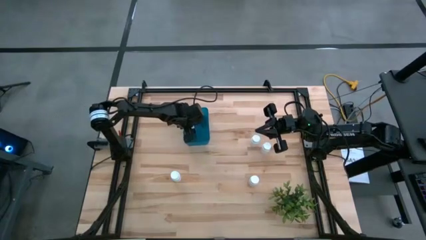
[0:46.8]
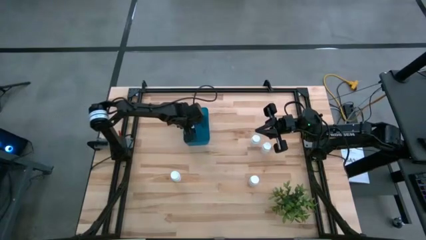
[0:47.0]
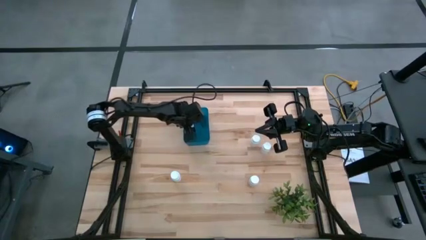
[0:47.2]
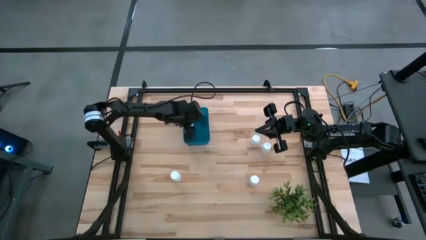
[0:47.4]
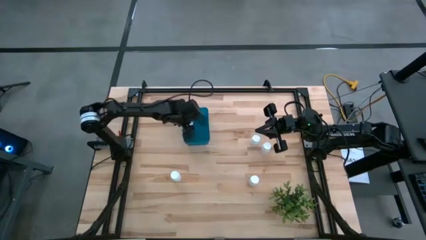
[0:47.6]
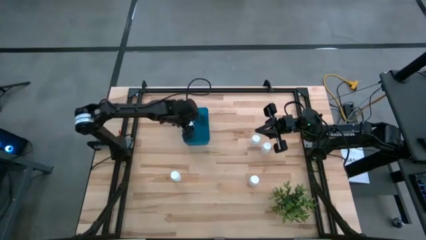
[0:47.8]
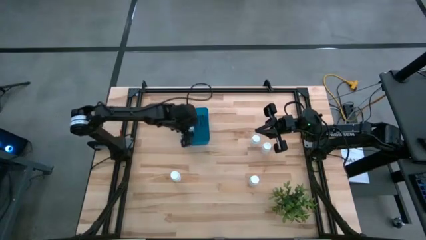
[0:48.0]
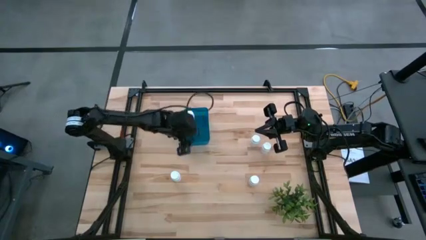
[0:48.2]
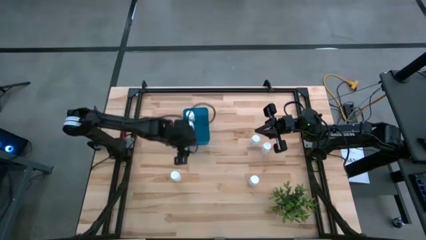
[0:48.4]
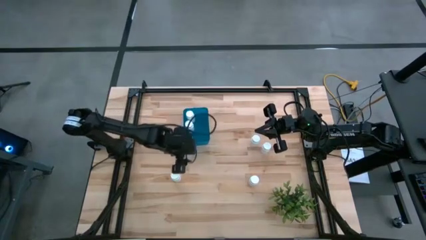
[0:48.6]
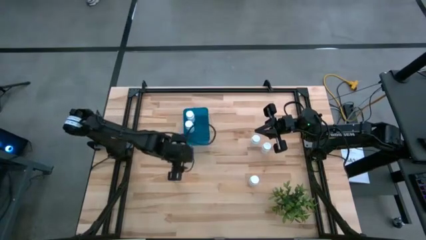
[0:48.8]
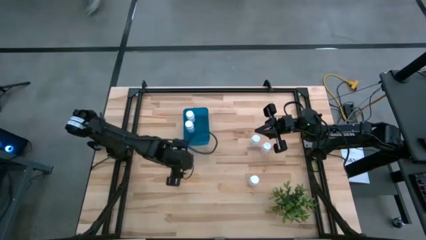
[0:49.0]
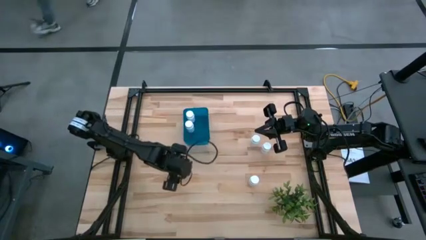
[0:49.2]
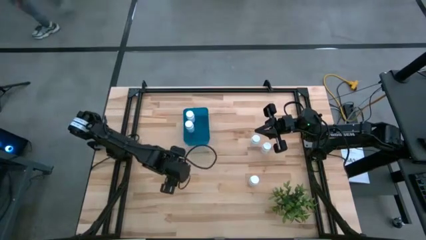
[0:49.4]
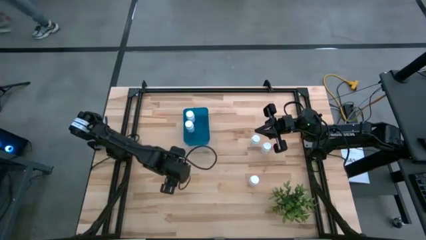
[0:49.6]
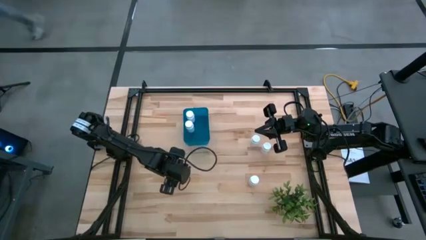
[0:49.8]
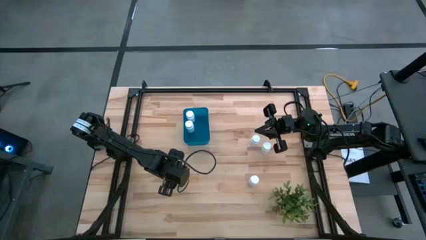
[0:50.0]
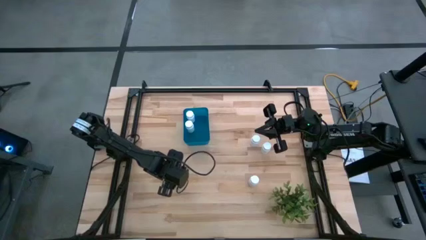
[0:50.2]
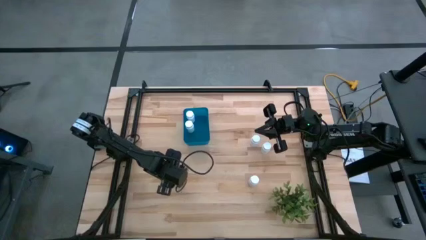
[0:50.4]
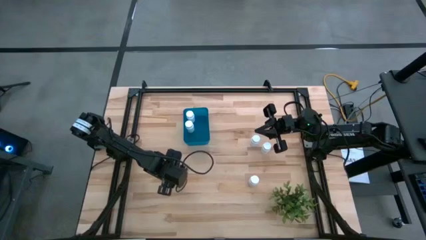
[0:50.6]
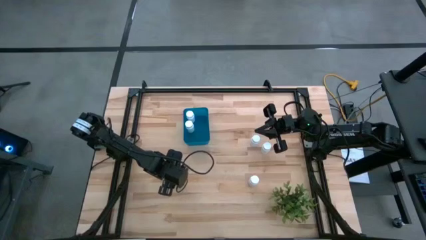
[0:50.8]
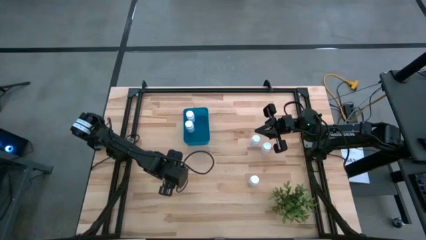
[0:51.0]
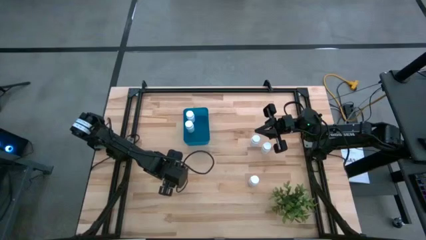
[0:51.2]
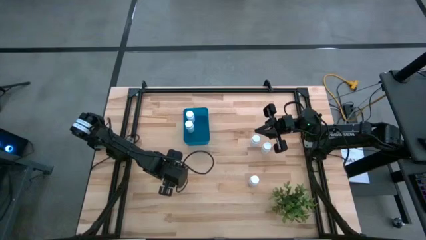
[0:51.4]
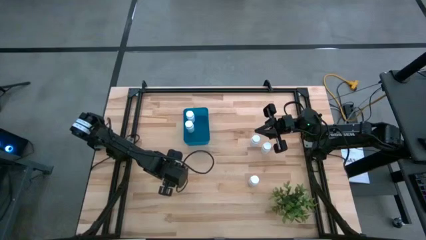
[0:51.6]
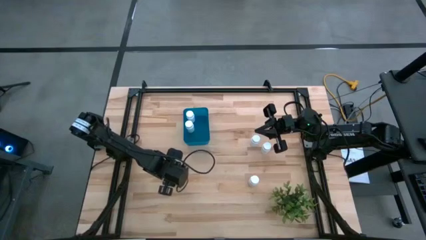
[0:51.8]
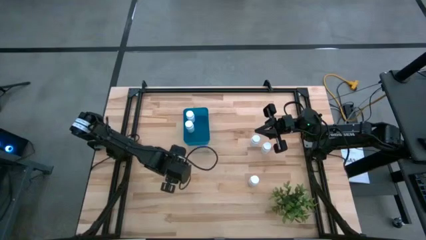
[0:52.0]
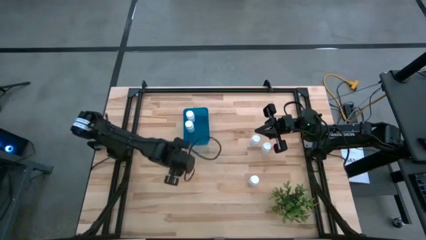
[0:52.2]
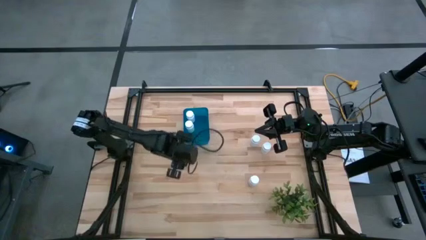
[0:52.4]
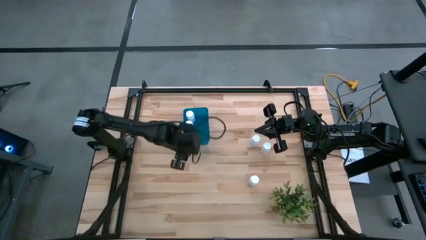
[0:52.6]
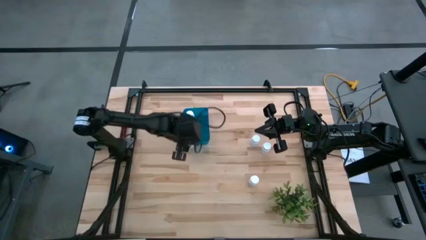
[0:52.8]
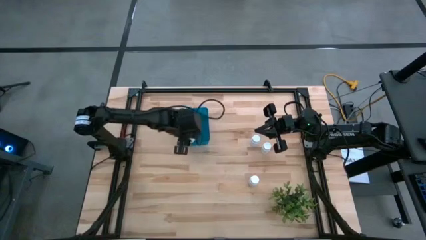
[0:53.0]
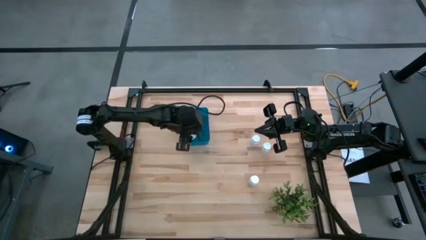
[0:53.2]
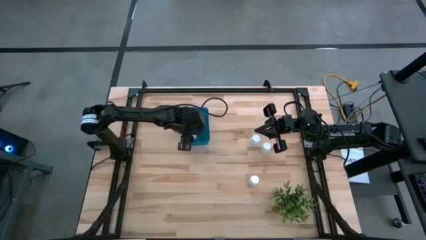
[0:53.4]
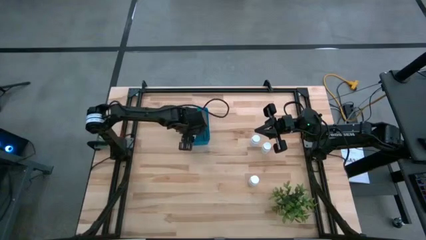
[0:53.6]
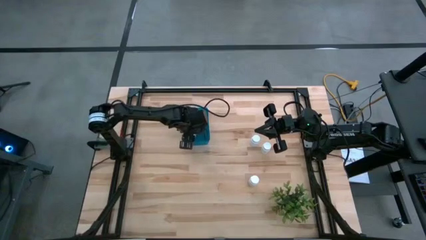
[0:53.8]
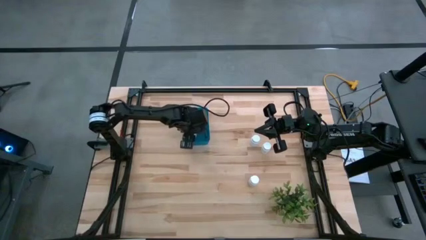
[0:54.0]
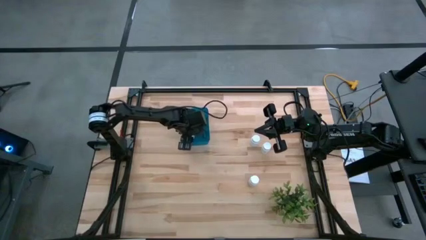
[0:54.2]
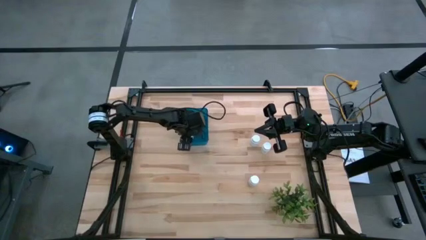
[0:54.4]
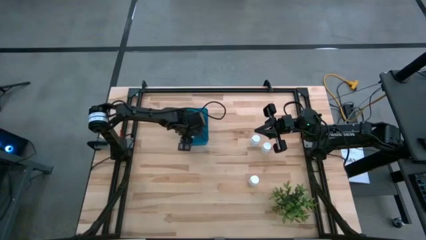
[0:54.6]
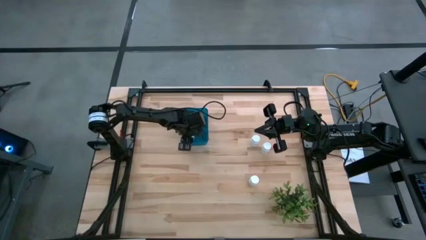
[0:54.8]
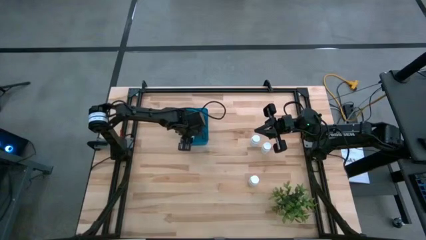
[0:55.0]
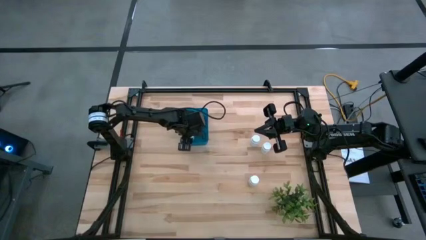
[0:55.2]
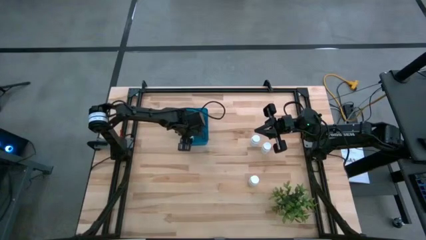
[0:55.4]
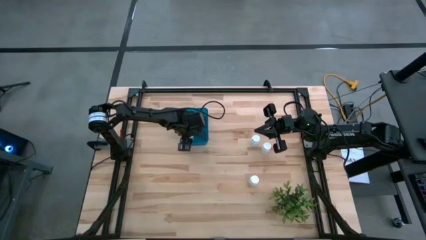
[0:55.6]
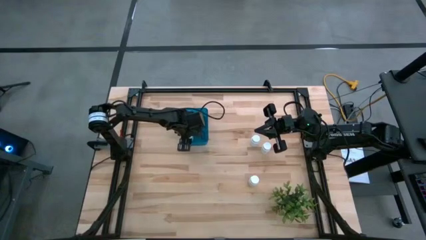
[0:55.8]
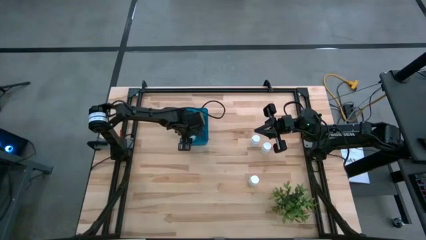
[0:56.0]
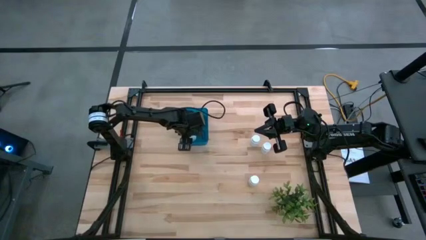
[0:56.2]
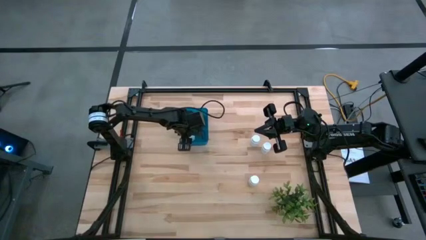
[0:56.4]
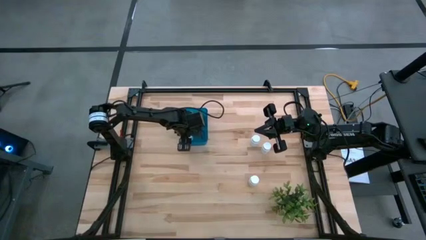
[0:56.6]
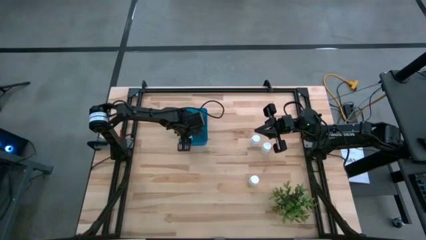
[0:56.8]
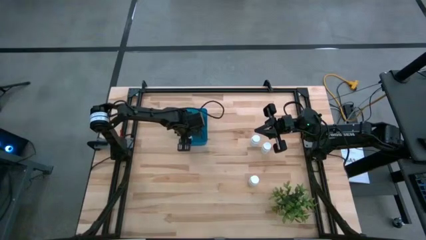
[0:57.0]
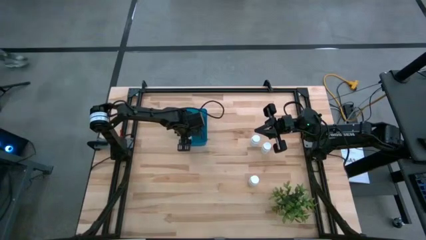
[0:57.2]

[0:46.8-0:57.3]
Task: Pick and place pill bottles into a basket
Put the white medicine bottle into the blue bin
